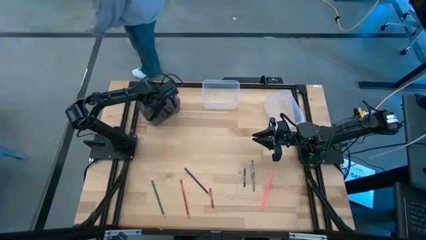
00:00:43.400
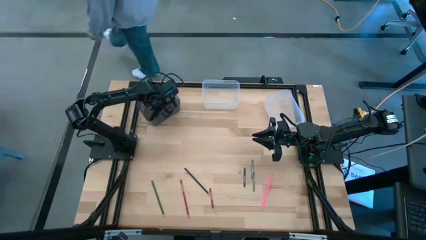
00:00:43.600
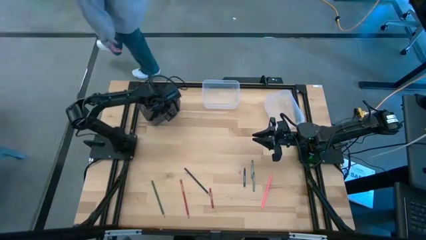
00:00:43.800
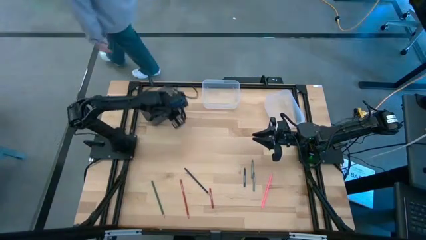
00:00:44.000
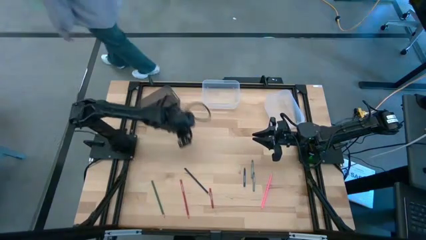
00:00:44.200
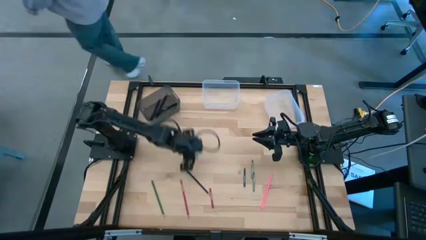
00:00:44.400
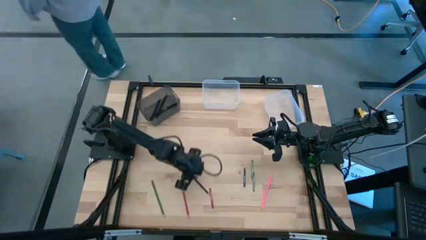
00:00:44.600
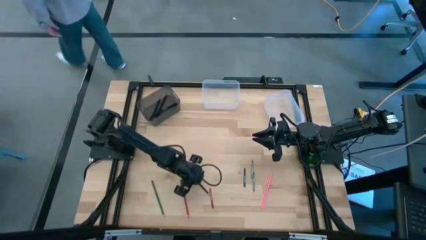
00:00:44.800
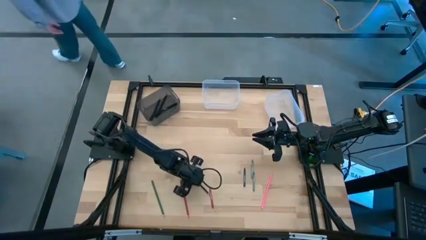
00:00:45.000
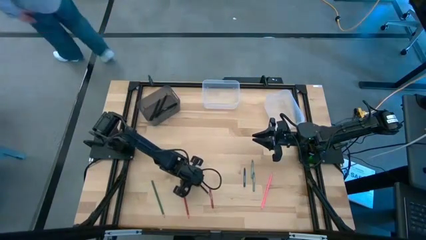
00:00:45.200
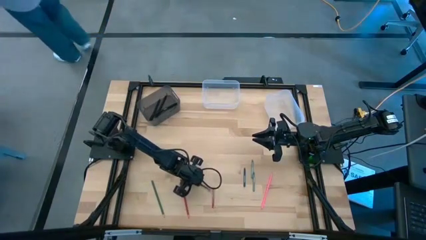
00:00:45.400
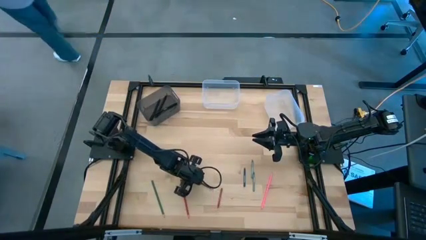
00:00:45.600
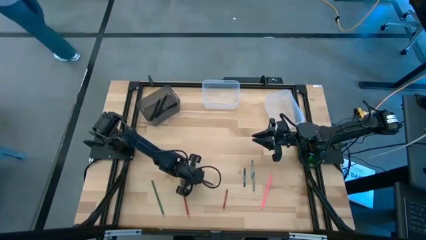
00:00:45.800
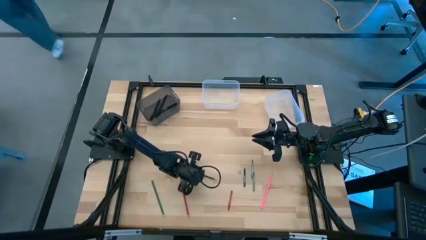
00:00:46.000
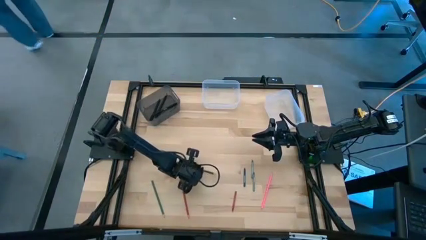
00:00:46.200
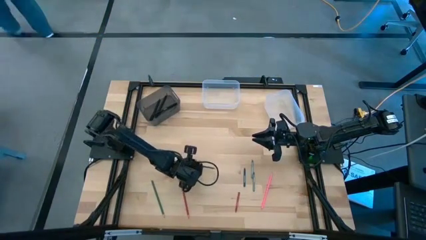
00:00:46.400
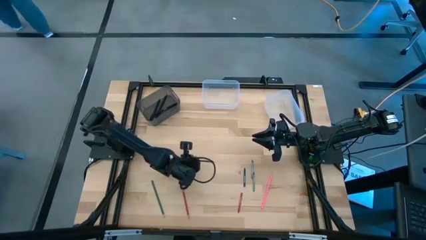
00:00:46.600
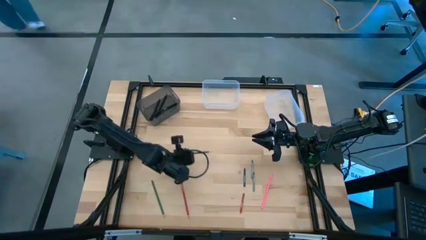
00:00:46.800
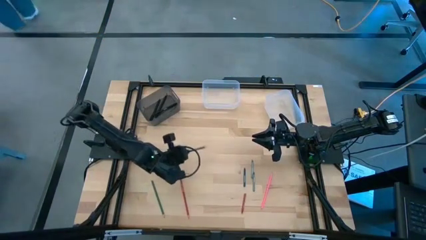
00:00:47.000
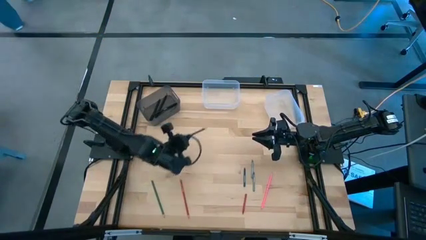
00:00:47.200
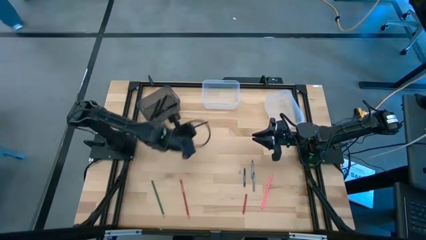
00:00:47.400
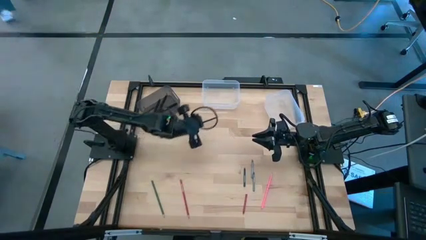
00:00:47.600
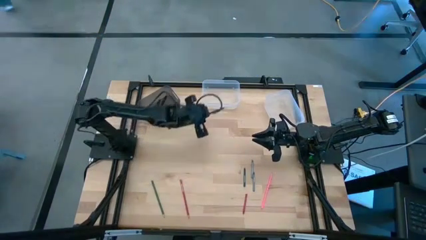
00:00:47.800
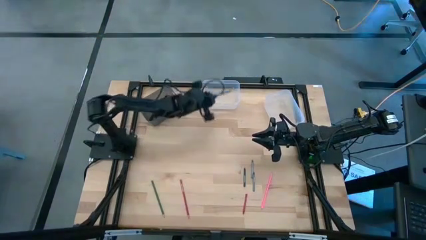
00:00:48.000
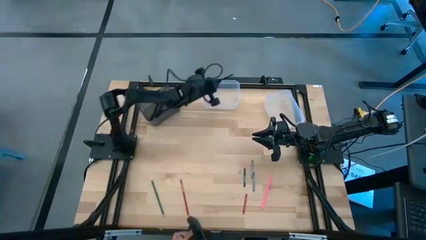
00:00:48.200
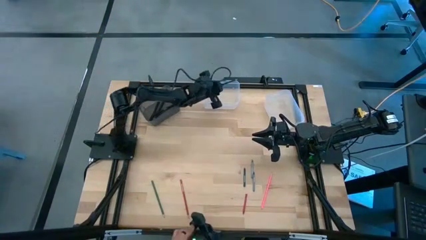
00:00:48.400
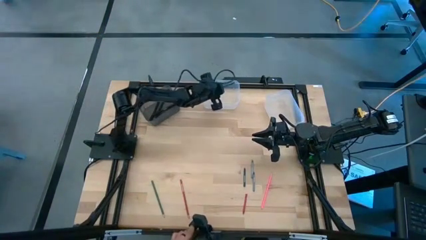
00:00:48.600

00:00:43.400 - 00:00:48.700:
Task: Sort crayons/erasers/pens/pencils in bins
Put the black pencil into the left transparent bin

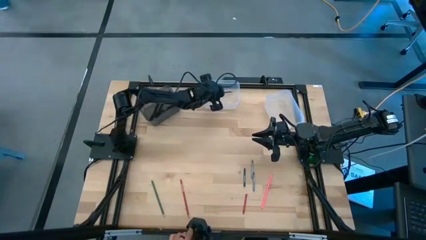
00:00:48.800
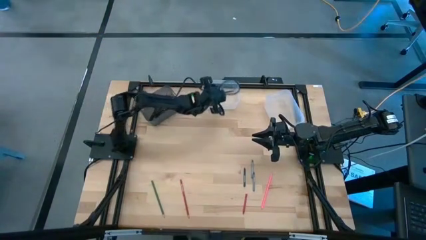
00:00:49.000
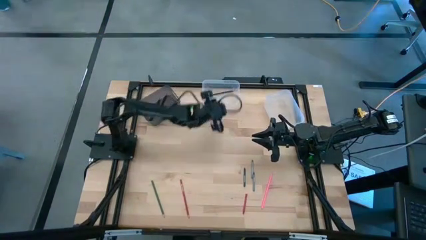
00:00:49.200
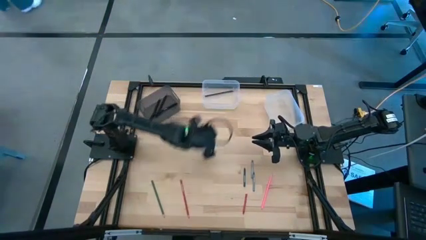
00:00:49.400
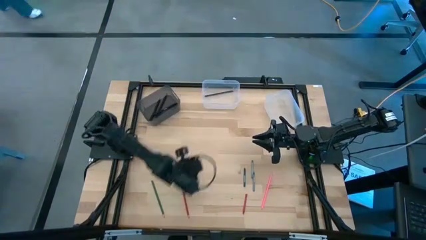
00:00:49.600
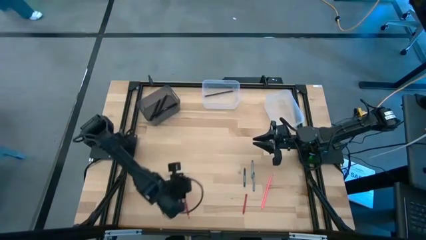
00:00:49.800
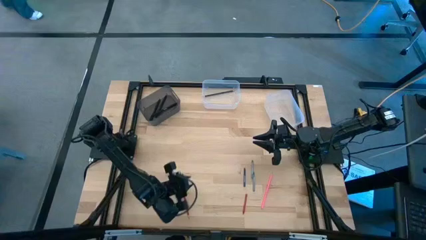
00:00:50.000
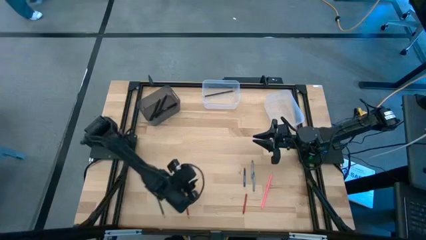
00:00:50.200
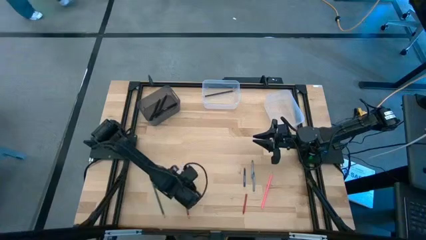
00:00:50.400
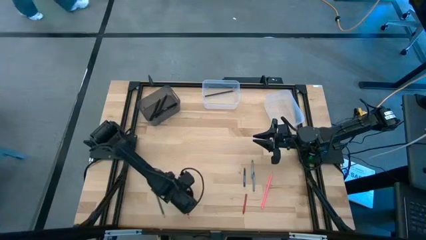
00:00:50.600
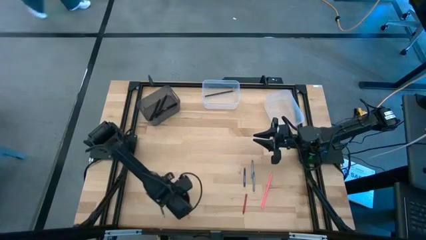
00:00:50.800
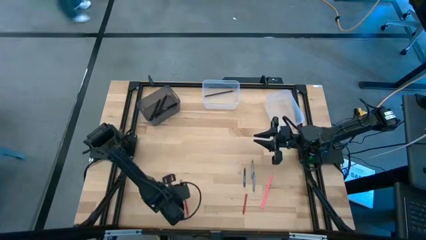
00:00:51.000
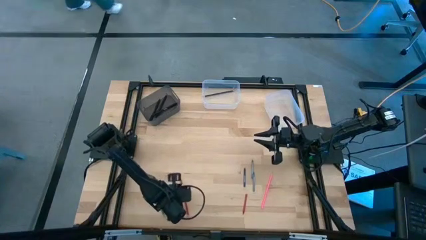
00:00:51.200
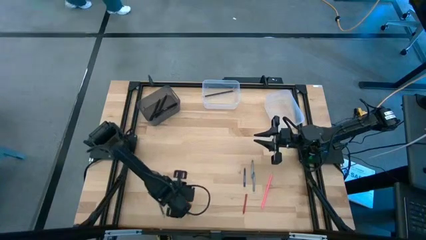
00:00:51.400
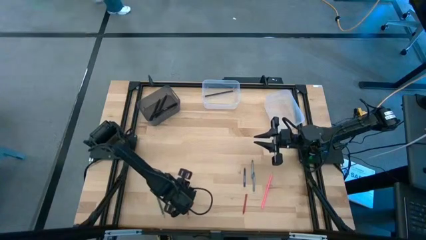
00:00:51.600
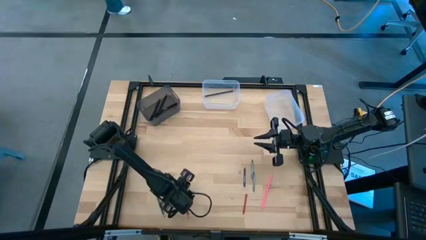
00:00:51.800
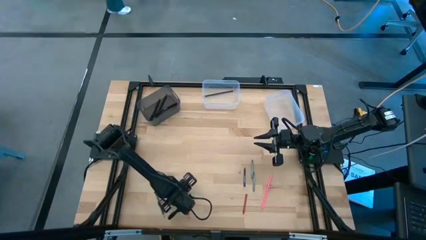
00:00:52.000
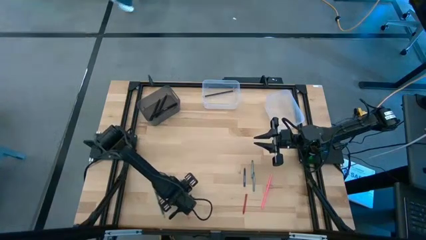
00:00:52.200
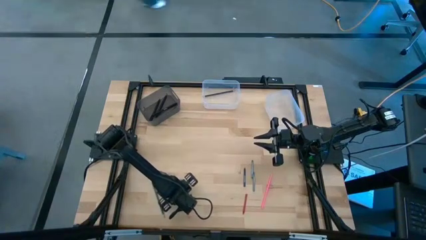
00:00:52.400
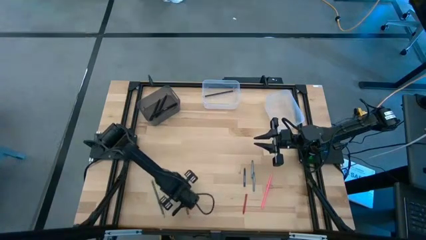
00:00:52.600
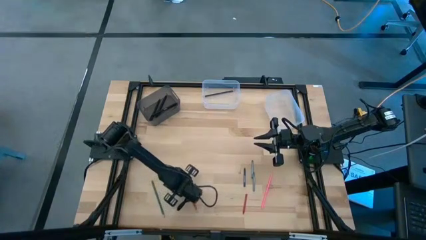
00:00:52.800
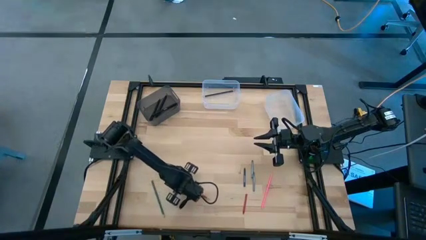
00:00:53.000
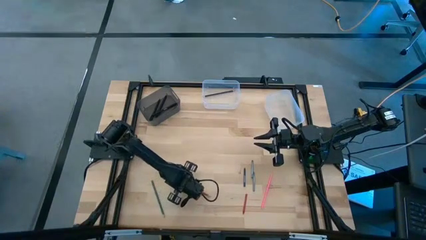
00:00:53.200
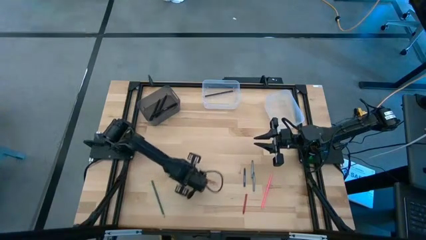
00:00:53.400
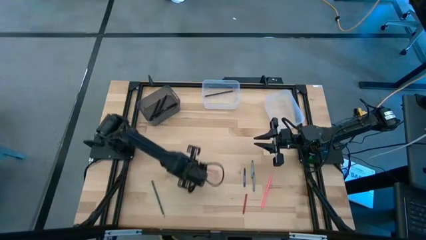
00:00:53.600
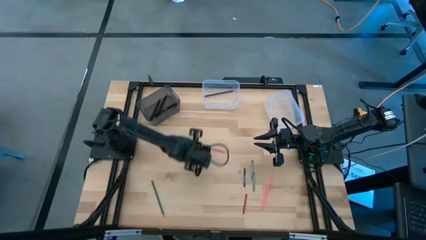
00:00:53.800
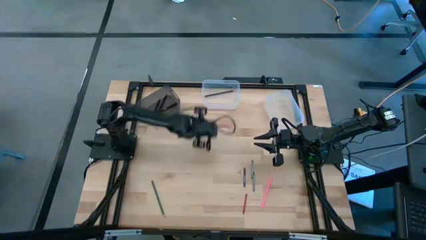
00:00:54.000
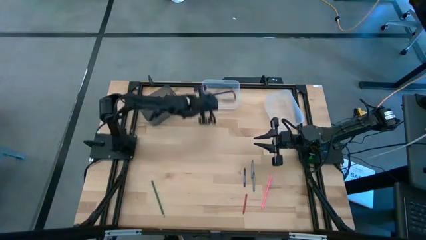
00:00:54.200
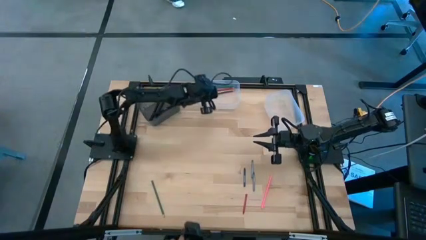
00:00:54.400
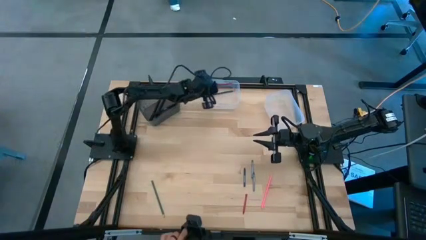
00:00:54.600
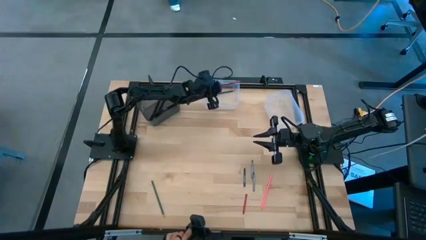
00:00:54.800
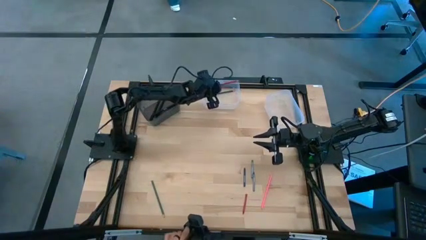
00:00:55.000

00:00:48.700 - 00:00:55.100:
Put the red pencil into the left transparent bin

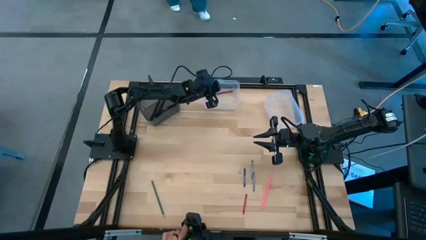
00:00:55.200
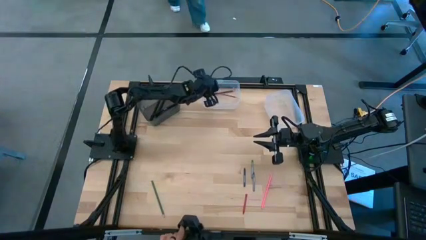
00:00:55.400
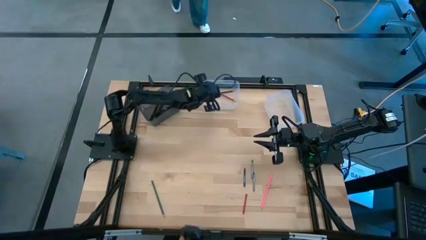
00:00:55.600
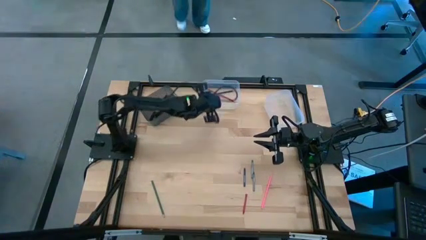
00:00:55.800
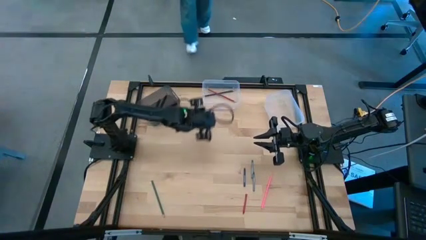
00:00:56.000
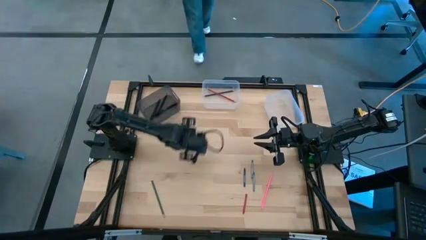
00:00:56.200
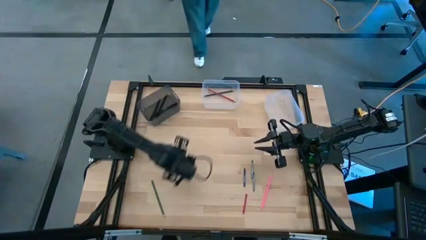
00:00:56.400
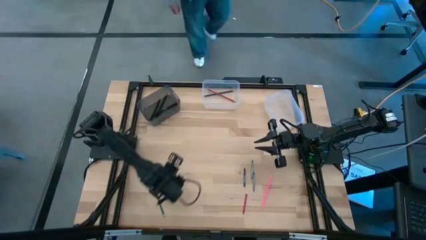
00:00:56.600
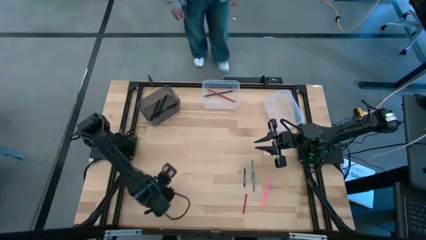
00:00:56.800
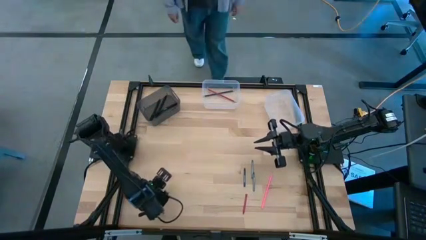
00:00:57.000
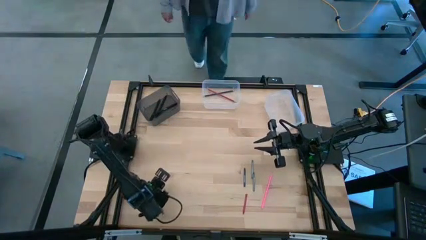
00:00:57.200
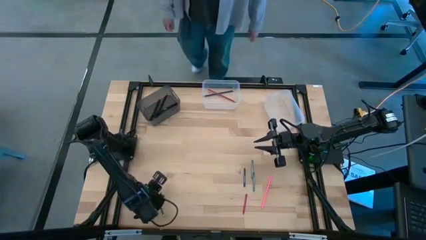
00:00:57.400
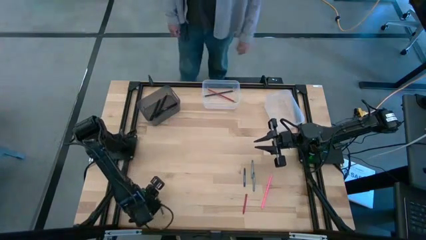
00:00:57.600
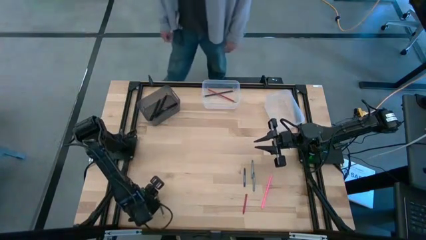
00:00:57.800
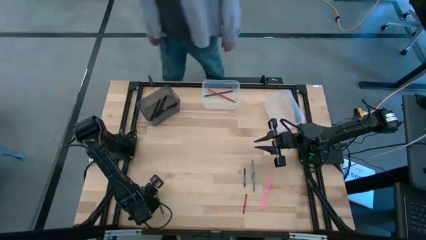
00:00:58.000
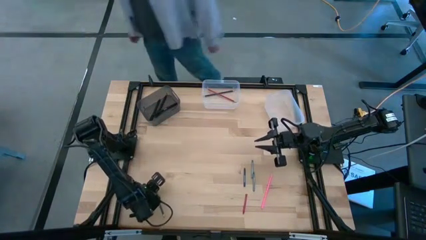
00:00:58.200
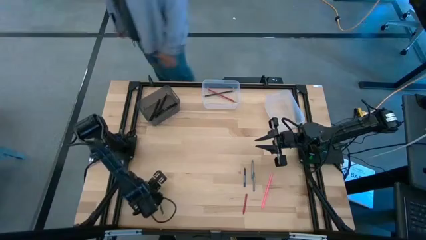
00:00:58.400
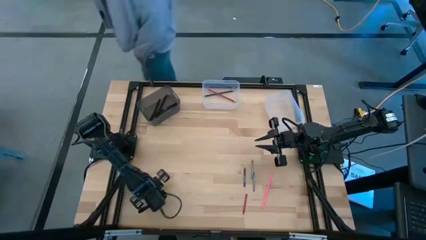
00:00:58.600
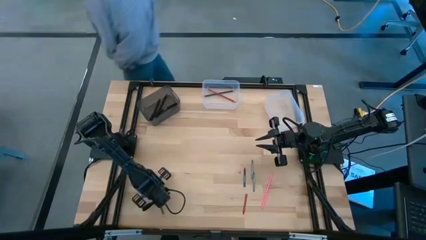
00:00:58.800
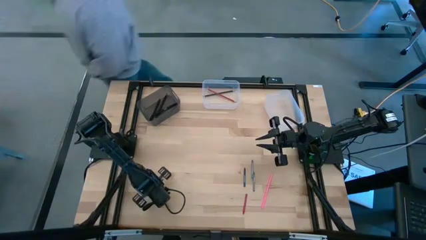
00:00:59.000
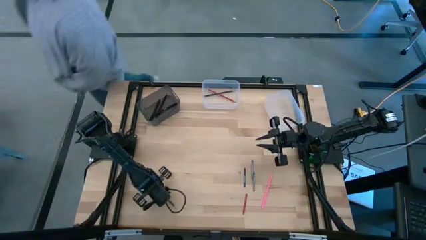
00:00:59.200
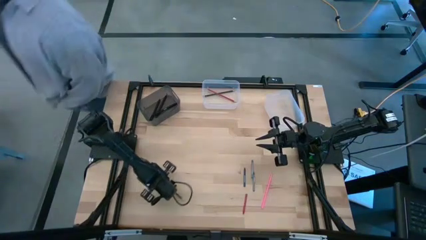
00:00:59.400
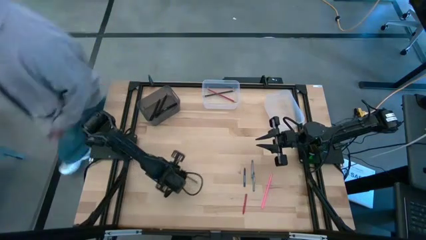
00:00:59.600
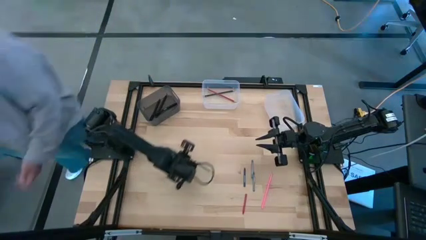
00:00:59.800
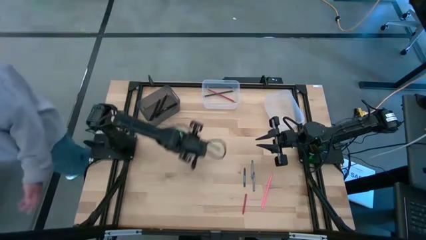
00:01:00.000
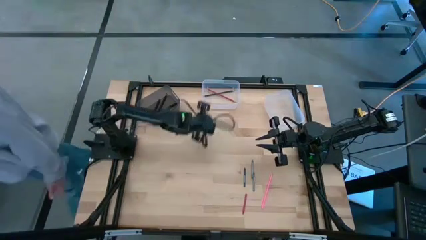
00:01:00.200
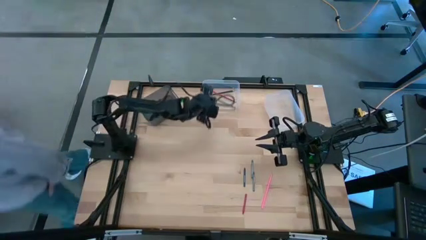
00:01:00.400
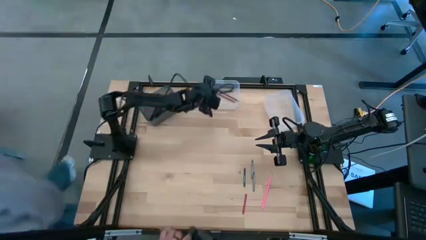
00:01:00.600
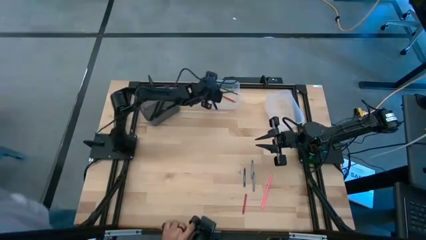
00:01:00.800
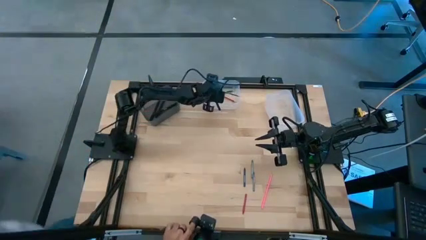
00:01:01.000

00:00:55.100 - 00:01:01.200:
Put the green pencil into the left transparent bin
